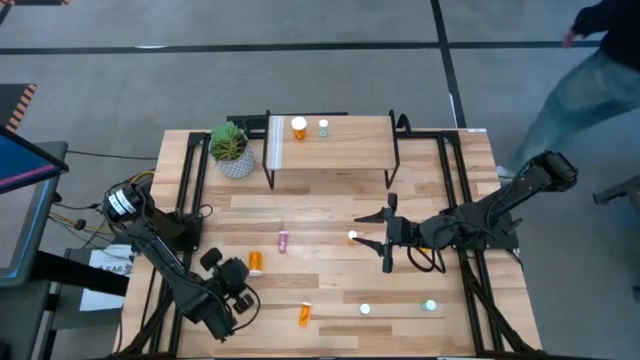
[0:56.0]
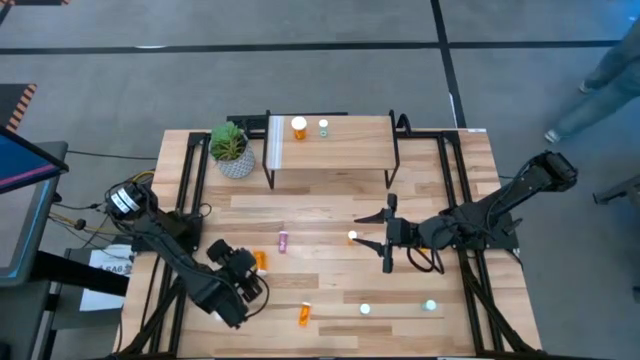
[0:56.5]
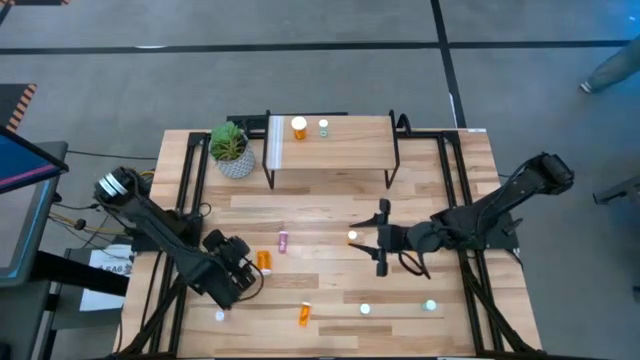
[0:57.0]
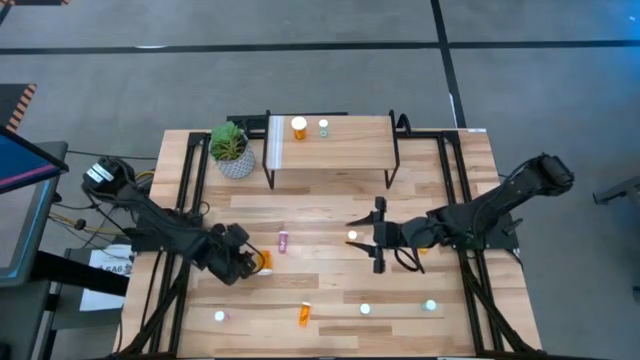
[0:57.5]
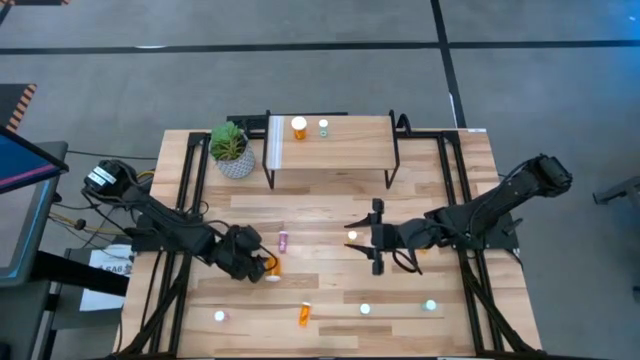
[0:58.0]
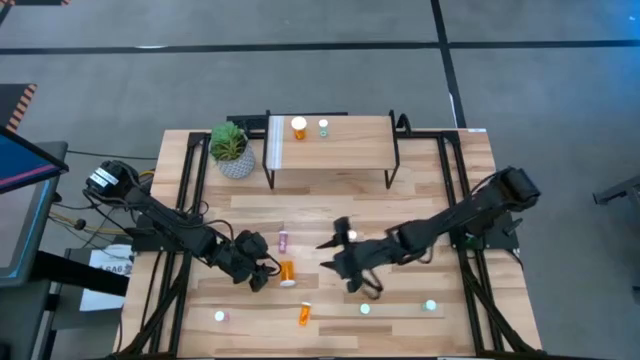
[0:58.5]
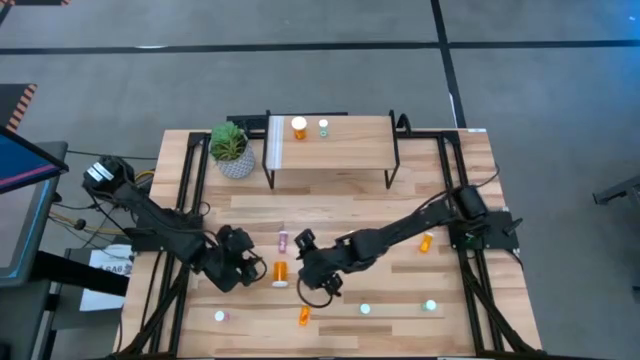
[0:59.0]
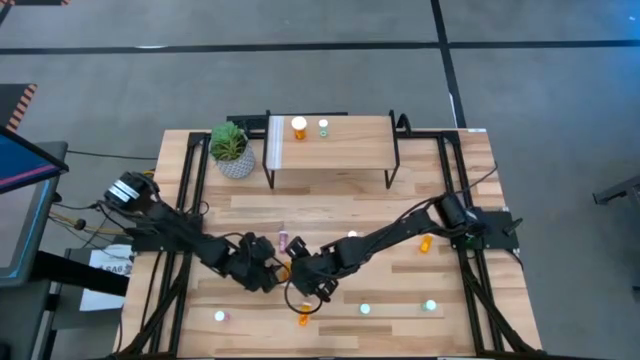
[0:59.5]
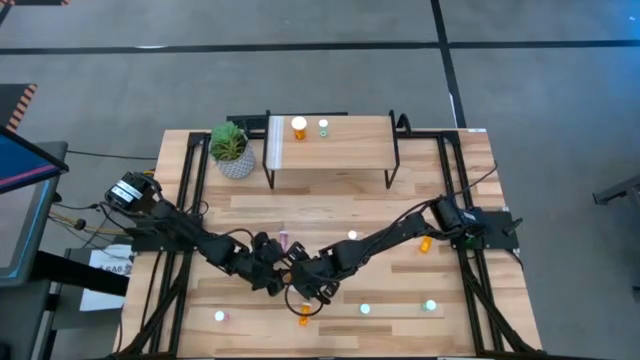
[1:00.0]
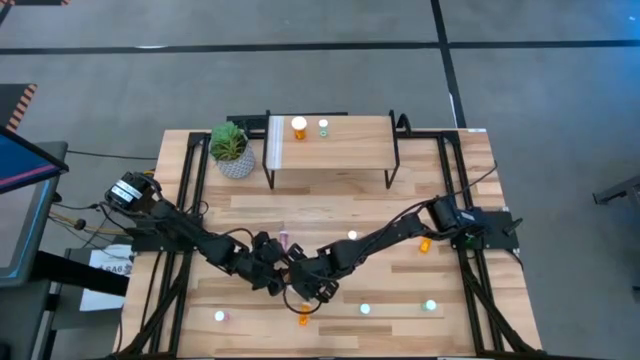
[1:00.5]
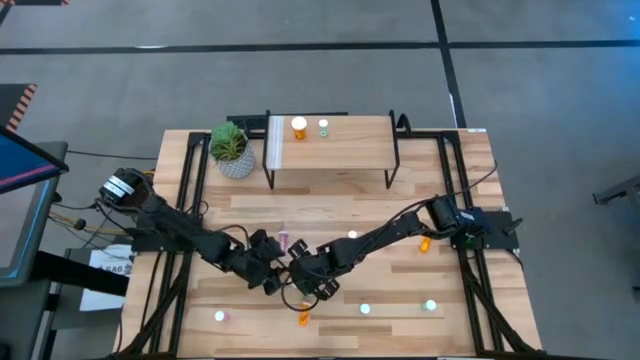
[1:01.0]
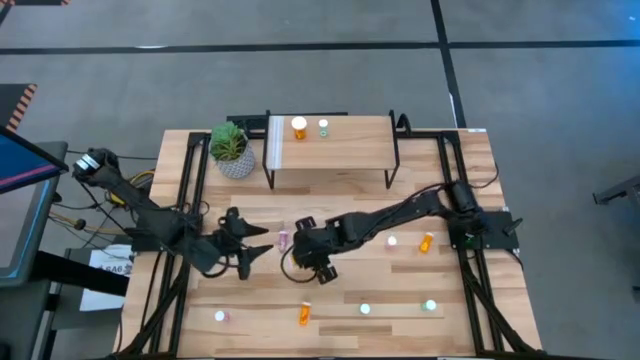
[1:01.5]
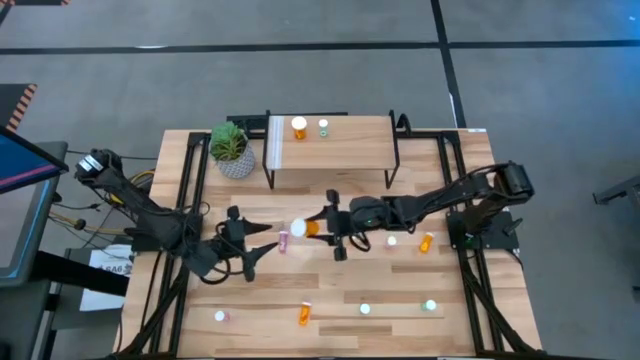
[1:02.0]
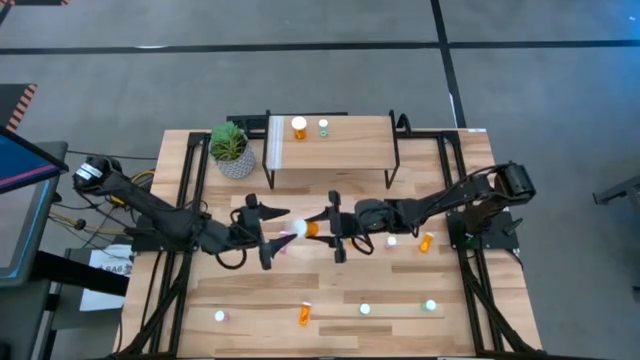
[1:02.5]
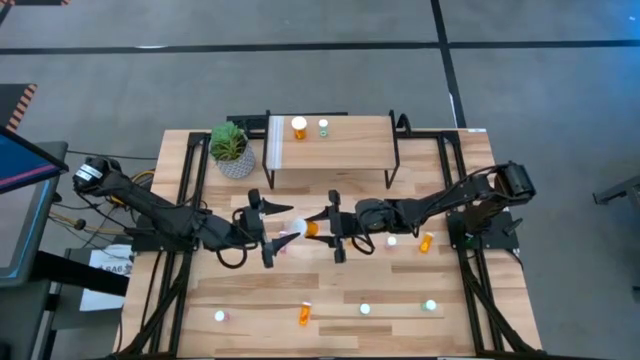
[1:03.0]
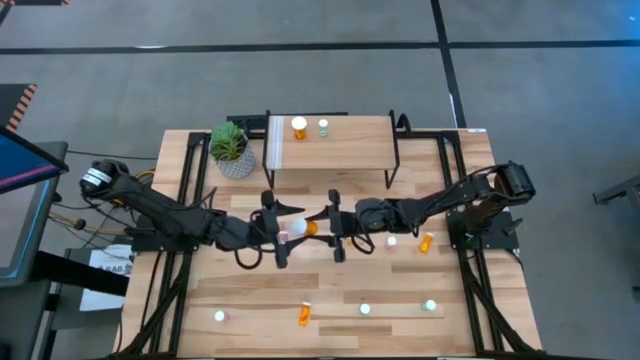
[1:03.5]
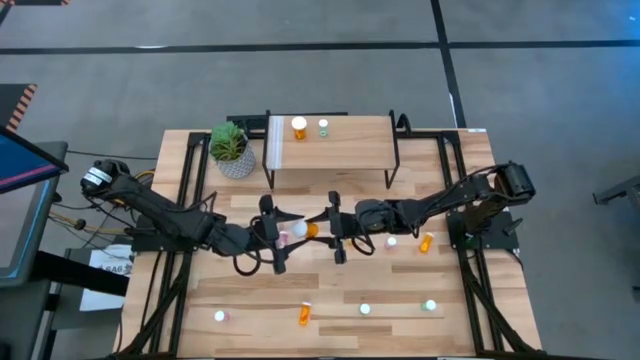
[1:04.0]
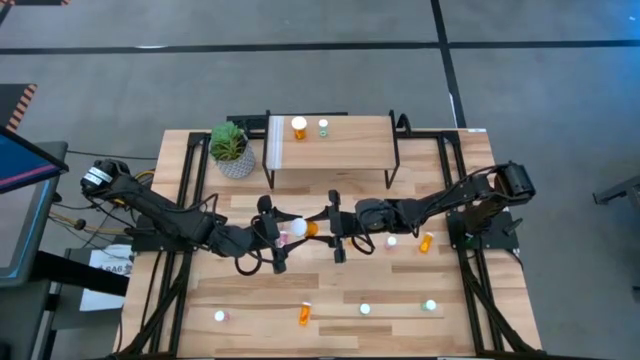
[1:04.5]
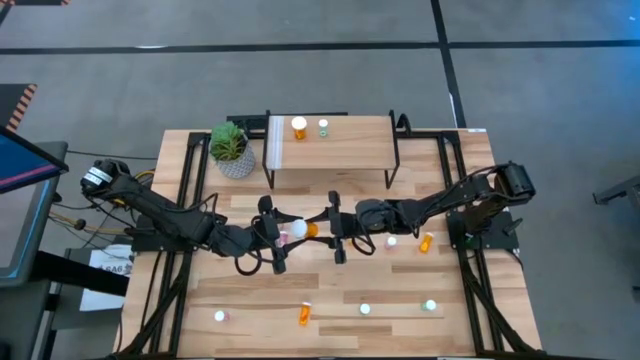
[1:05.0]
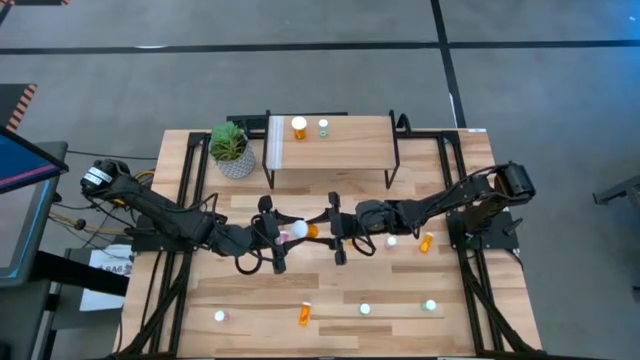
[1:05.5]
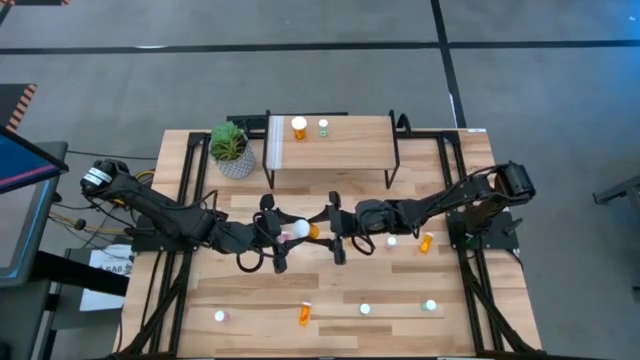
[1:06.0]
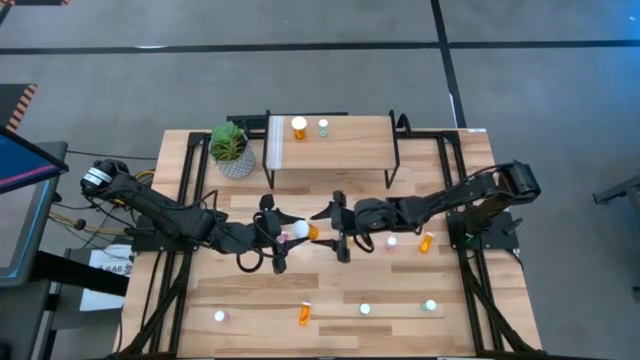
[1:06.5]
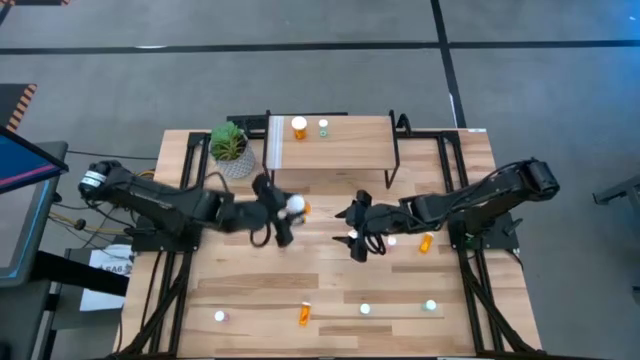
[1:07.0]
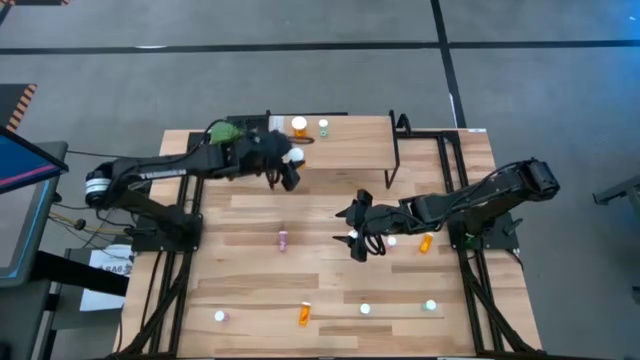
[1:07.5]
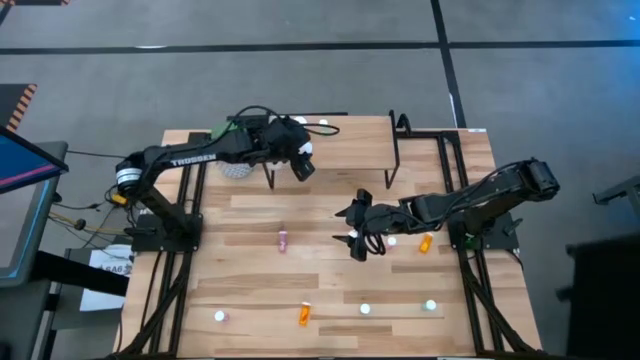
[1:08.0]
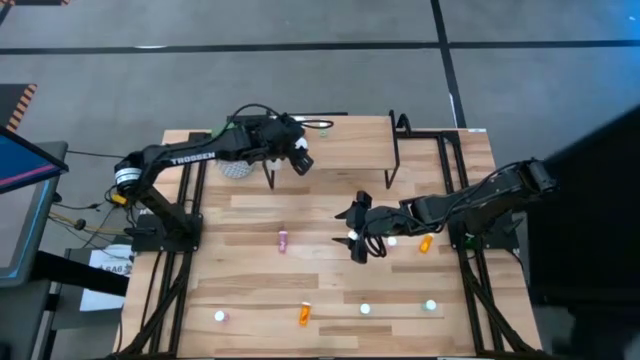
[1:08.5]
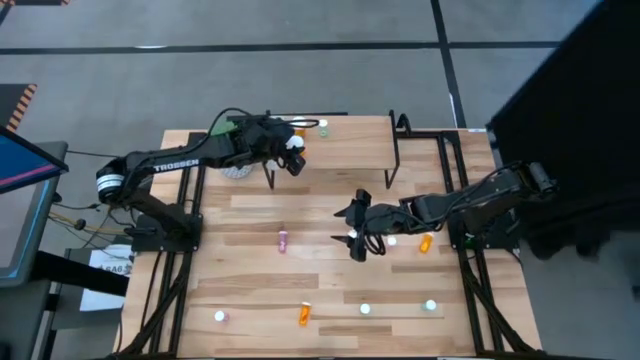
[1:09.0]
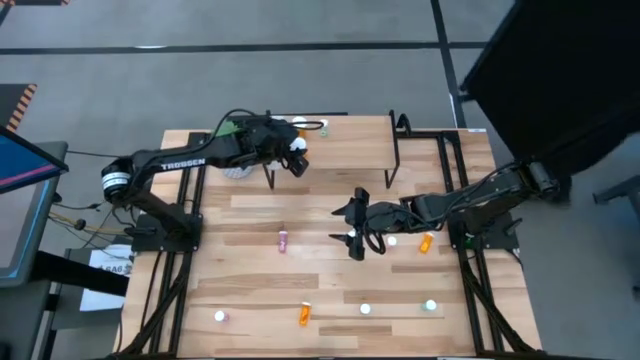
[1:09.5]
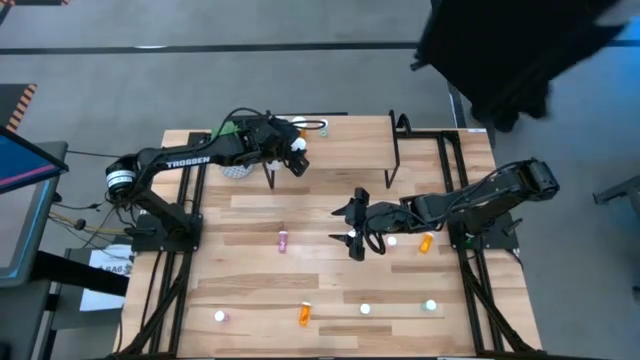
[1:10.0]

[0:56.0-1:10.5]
Task: Pick and place medicine bottles onto shelf by color
Put the big orange pill bottle on the shelf aligned with the other big orange pill bottle

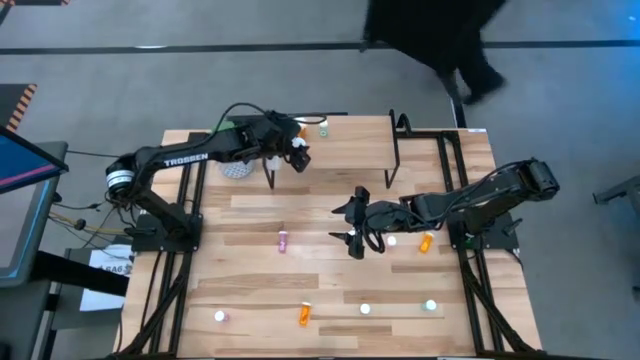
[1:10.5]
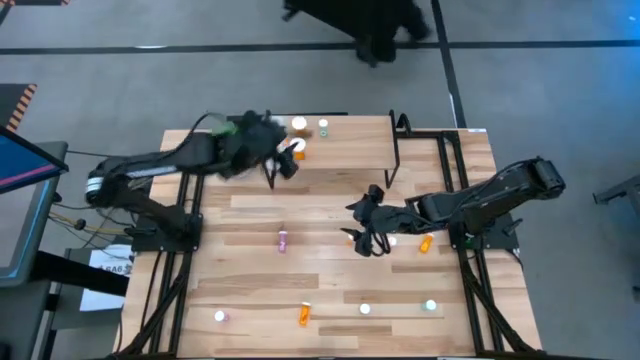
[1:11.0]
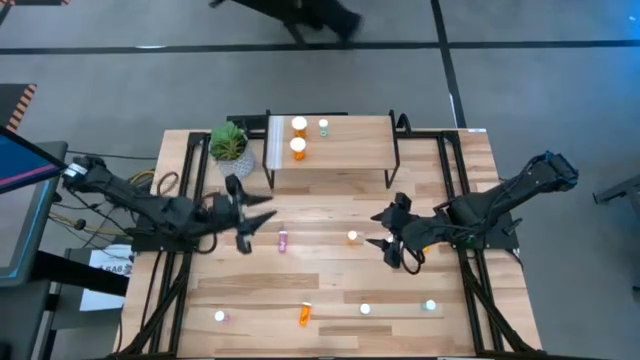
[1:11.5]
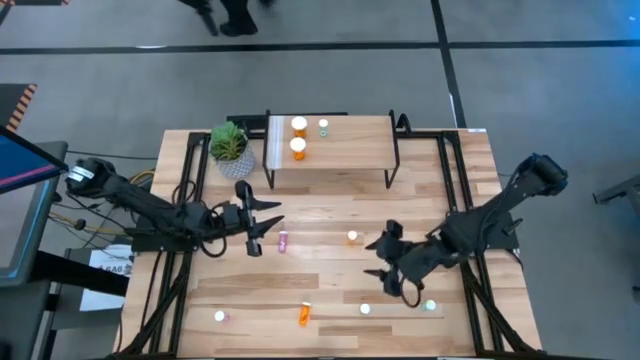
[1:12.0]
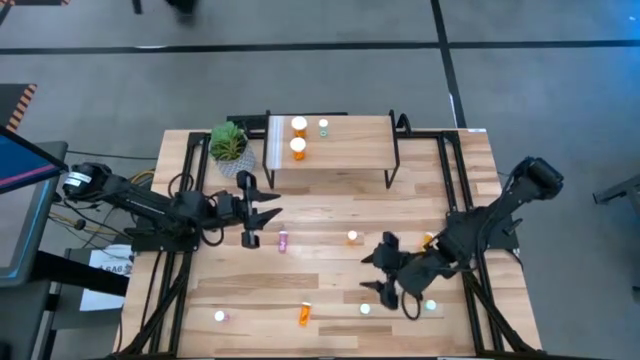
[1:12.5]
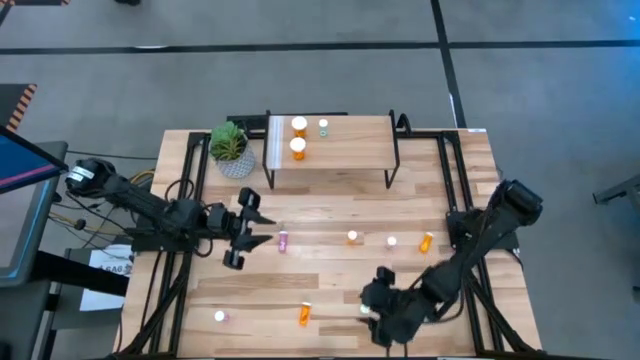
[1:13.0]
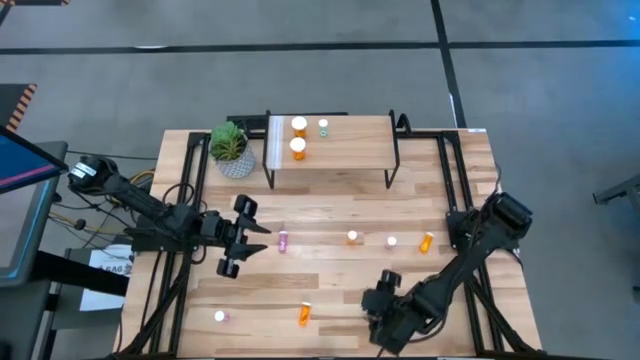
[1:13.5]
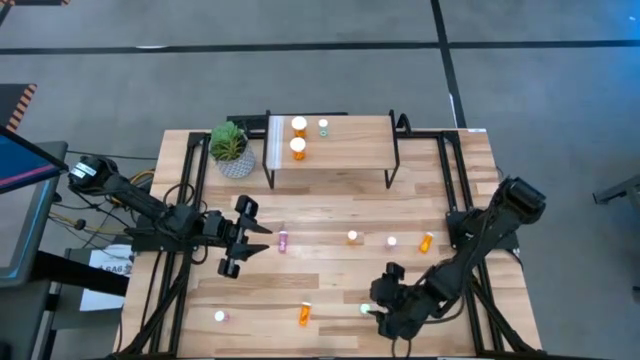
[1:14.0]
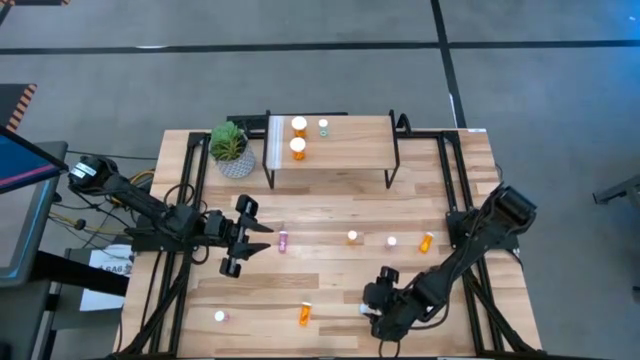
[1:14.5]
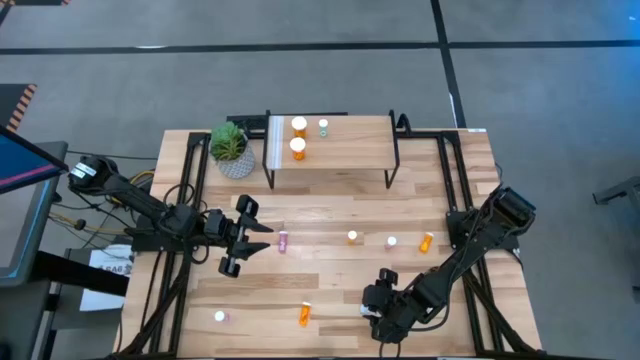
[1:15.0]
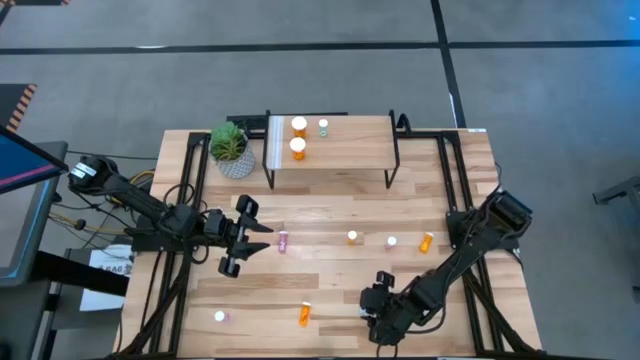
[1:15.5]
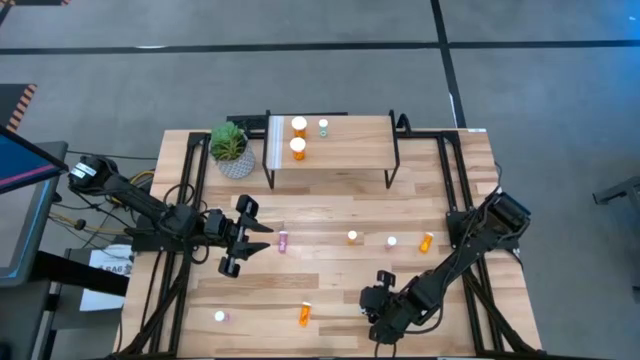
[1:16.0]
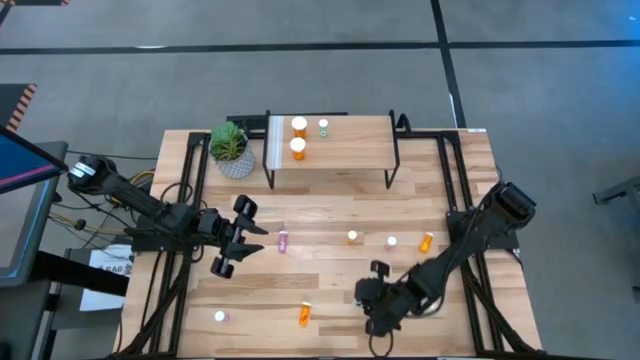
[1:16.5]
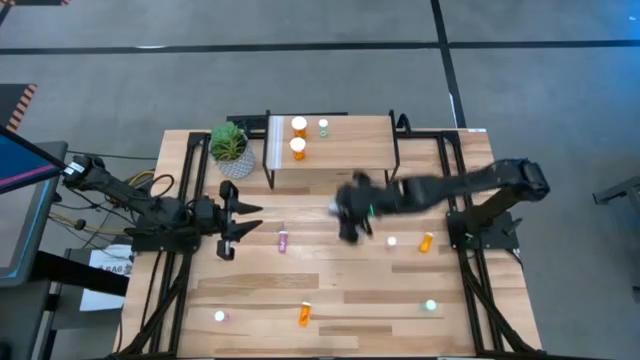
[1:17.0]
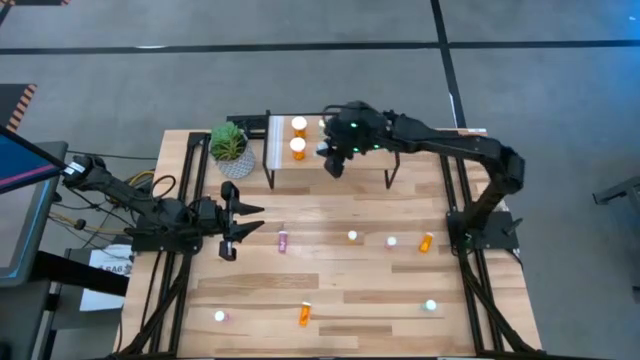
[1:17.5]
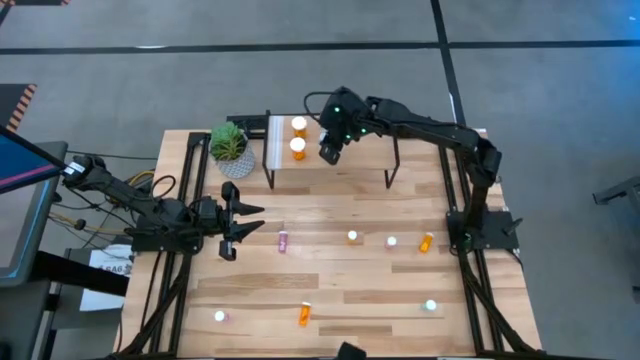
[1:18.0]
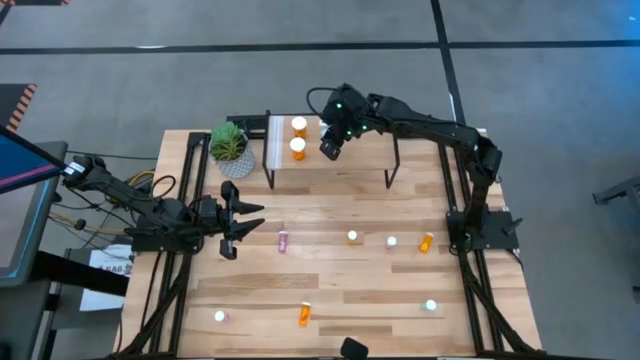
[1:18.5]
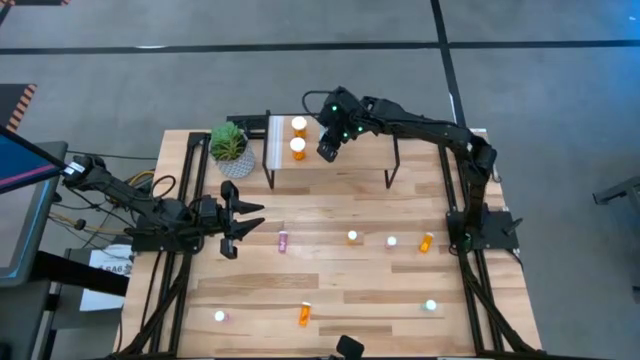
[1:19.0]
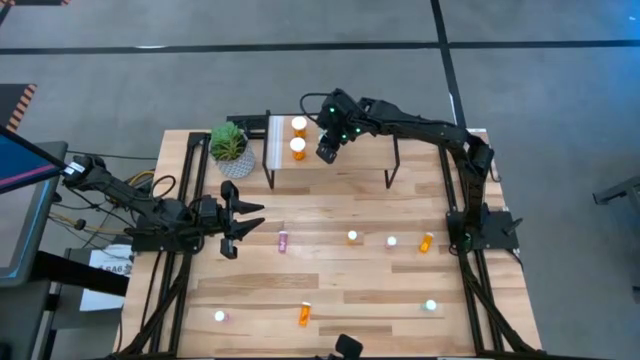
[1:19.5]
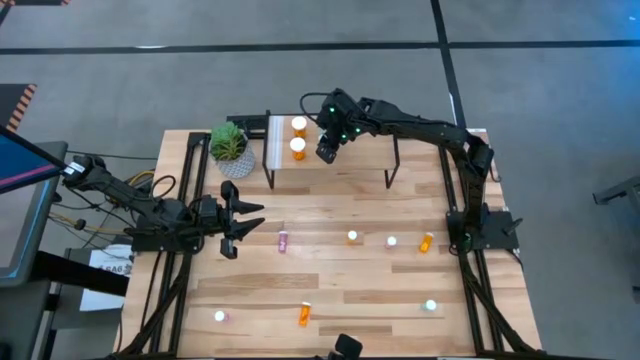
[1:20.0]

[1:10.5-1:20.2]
Put the blue pill bottle on the shelf aligned with the other blue pill bottle
